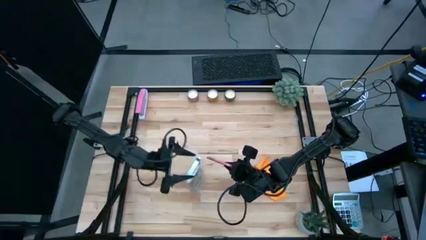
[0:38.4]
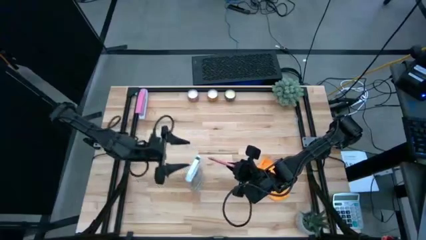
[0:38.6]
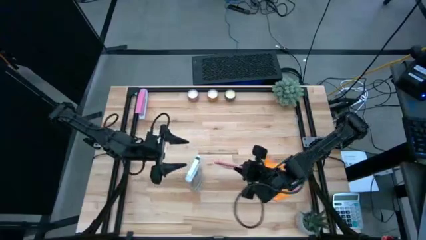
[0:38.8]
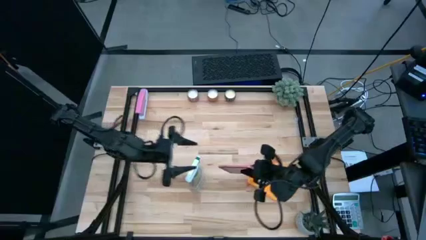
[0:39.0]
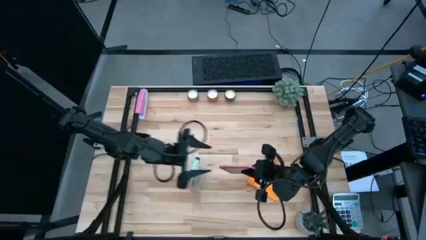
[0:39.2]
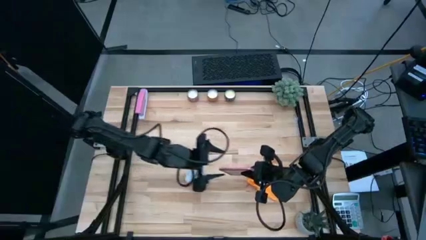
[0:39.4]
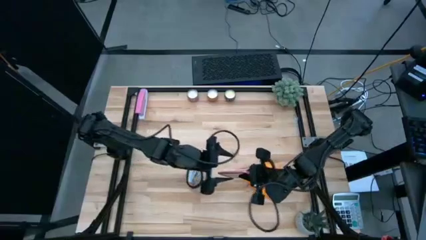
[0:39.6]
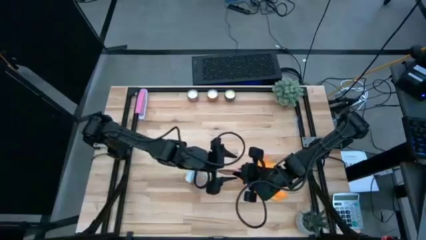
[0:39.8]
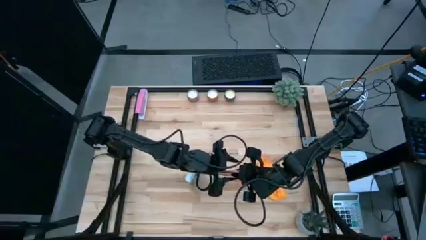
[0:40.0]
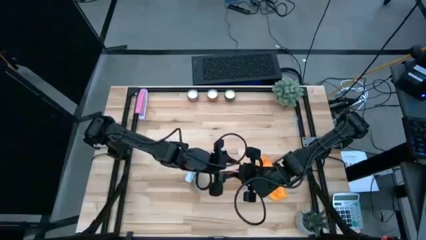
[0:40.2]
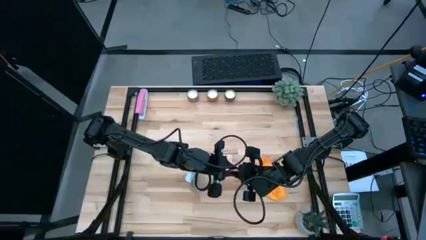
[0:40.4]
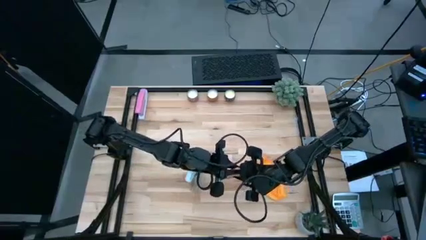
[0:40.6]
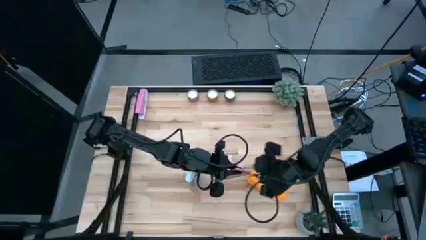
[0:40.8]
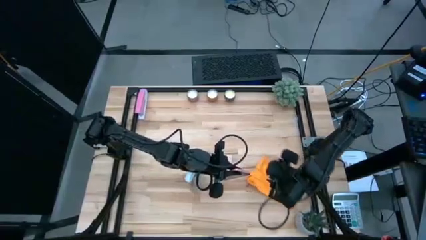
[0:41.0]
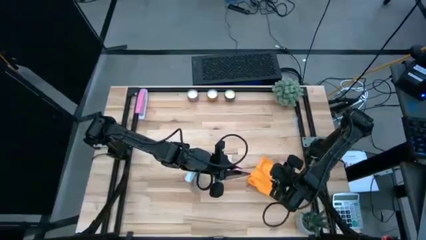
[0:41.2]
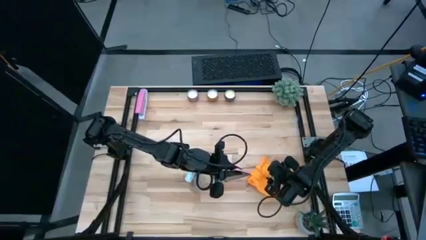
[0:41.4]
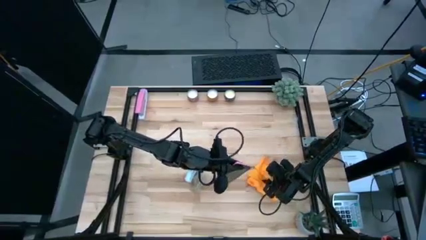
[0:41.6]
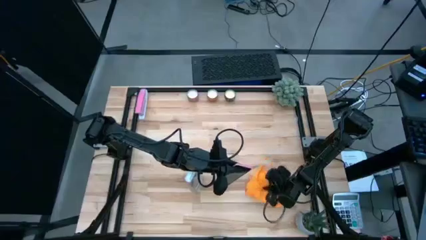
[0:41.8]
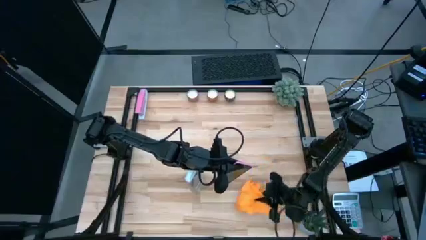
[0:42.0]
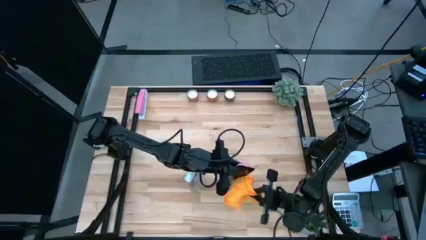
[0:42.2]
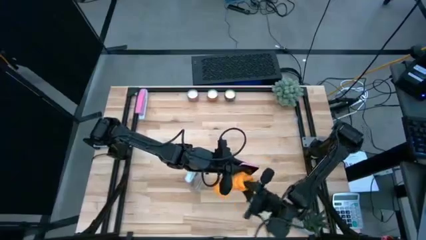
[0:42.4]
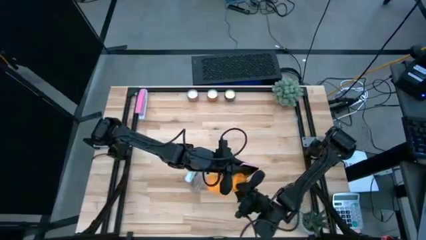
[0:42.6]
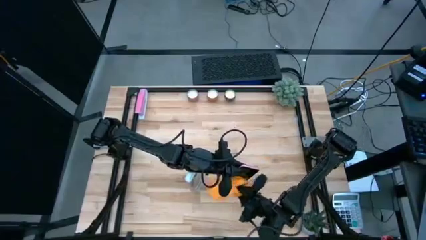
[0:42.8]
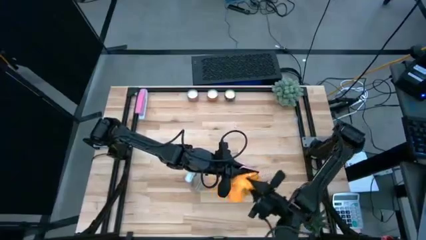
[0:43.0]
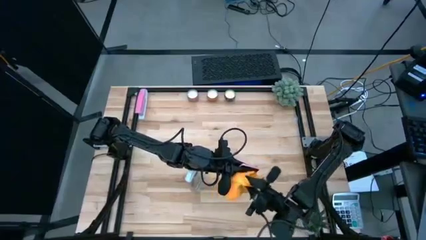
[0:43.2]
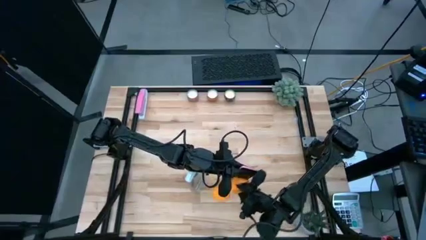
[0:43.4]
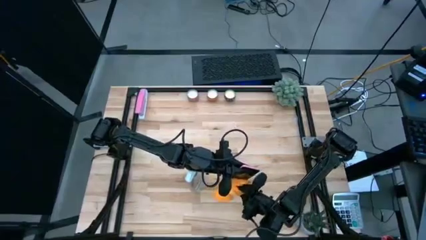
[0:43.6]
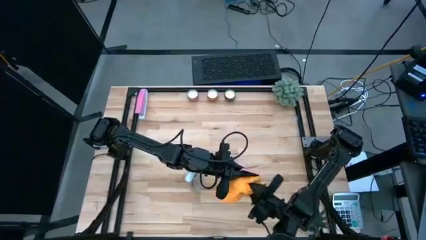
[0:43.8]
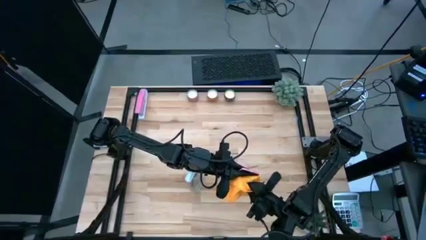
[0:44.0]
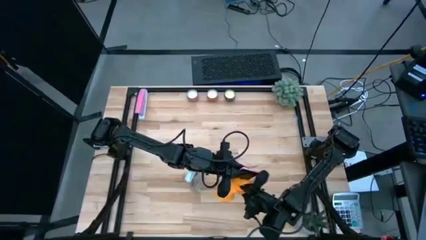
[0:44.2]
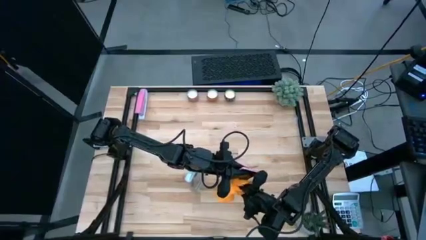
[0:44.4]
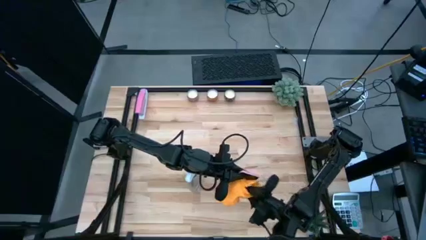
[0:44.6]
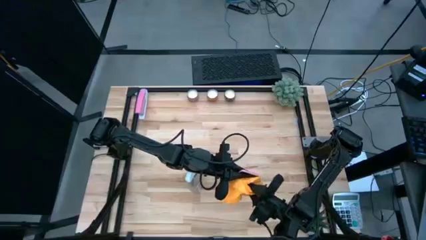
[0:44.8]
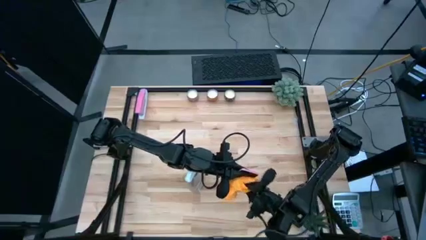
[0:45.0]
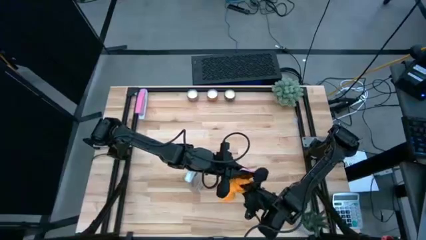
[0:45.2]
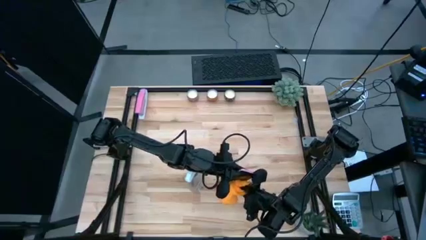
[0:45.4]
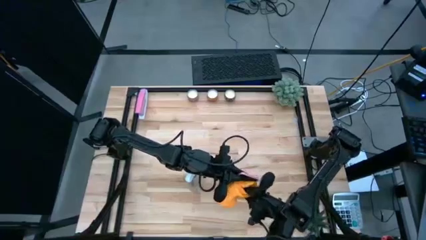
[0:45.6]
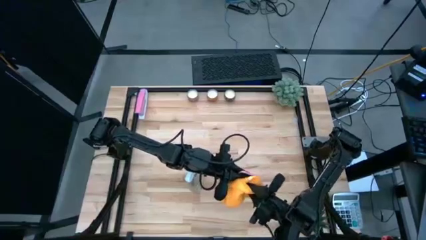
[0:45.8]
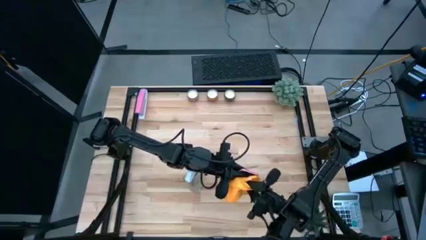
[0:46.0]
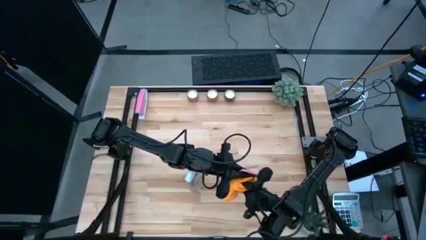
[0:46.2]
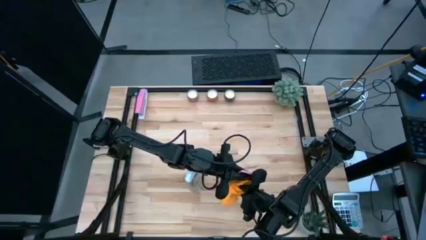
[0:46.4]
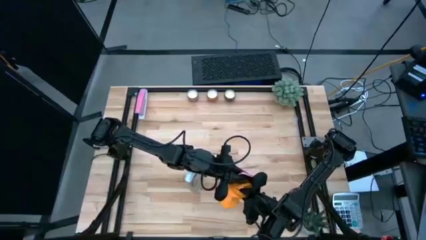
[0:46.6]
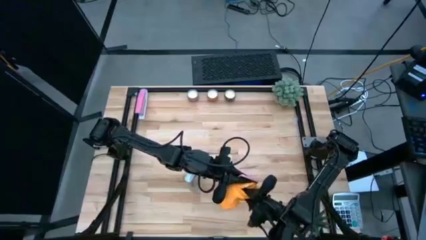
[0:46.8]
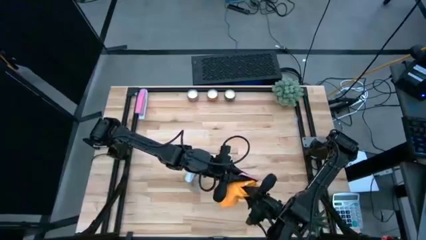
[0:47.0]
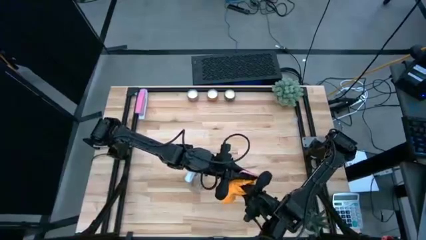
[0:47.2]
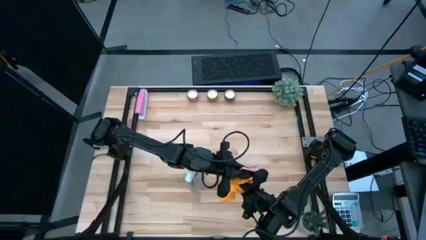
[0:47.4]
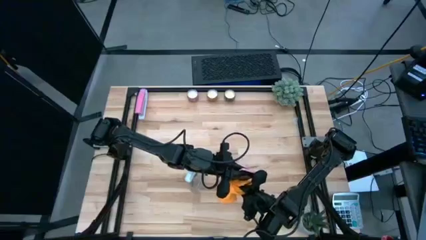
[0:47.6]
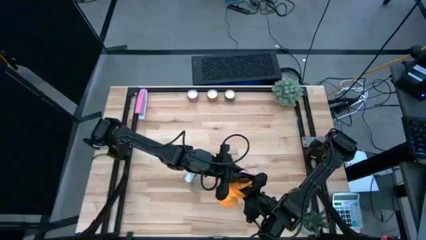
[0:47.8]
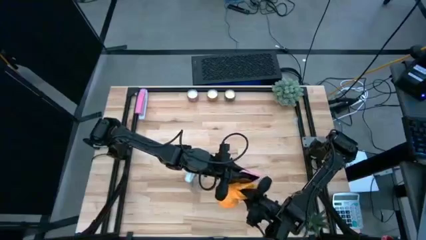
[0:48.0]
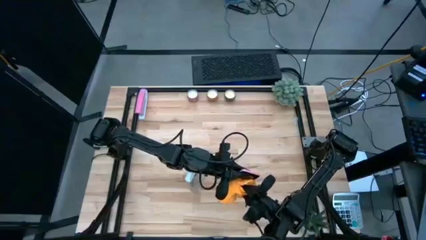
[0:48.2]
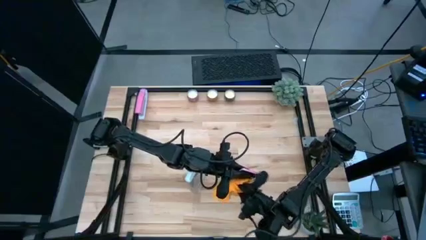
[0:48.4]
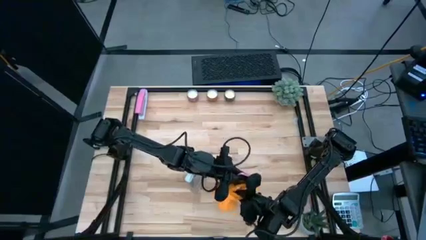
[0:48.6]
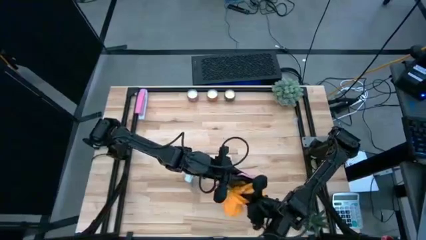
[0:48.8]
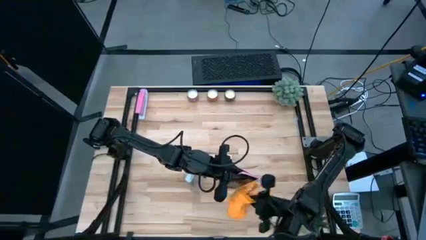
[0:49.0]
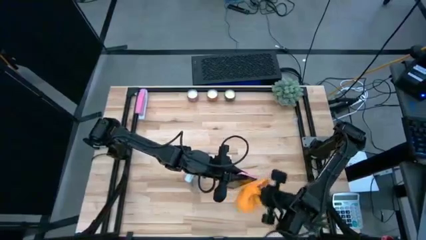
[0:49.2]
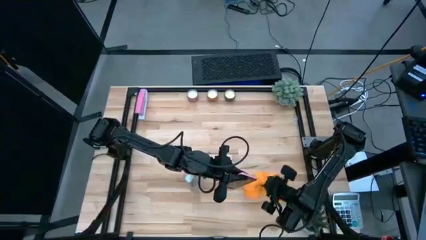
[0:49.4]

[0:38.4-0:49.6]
Task: Apply microfiber cloth
Wipe the front of the cellphone with a microfiber cloth

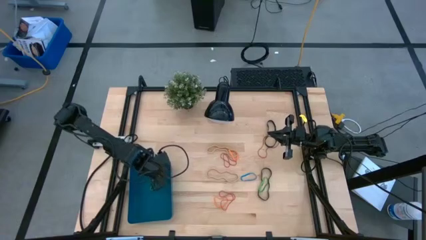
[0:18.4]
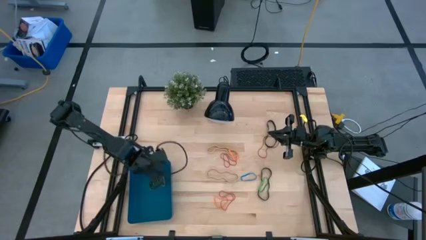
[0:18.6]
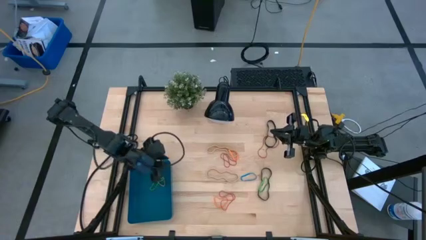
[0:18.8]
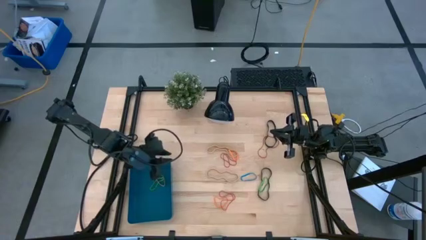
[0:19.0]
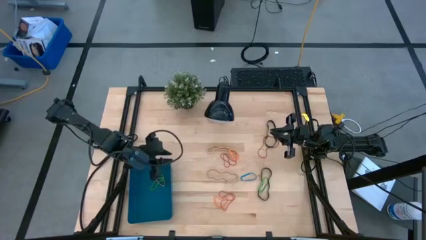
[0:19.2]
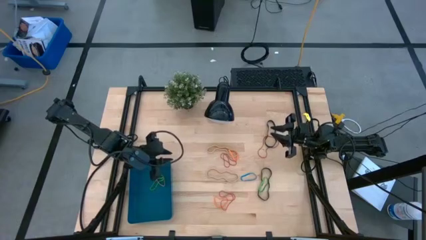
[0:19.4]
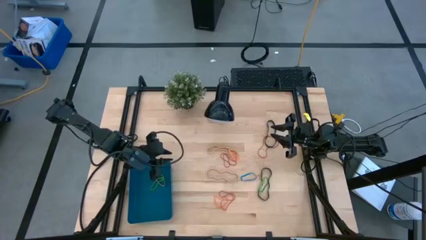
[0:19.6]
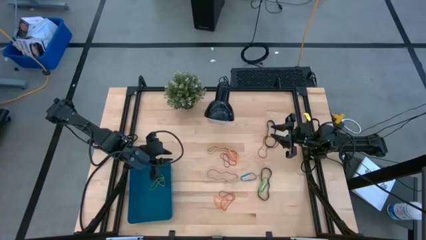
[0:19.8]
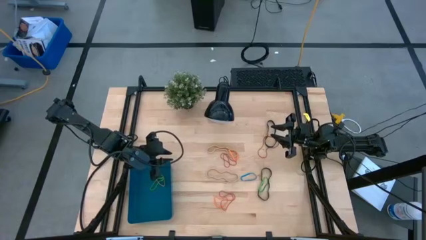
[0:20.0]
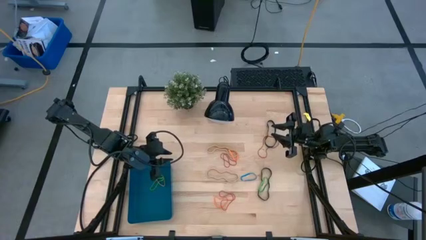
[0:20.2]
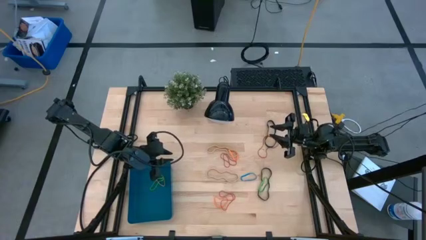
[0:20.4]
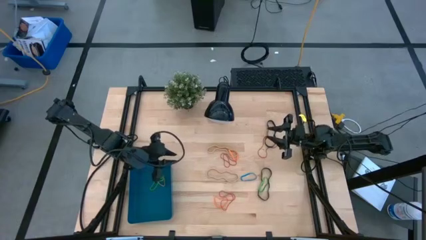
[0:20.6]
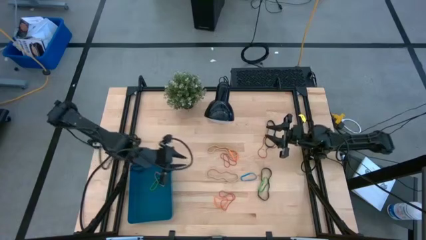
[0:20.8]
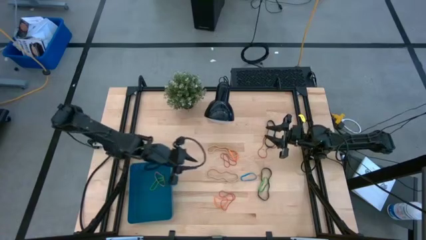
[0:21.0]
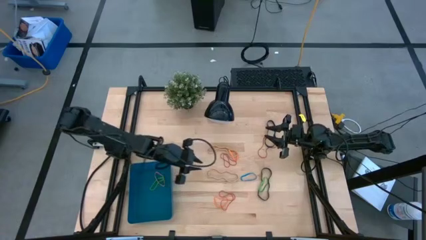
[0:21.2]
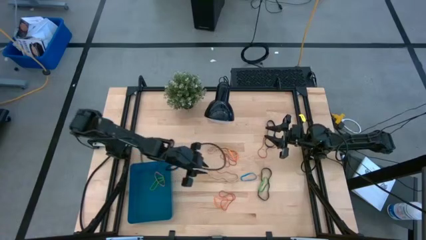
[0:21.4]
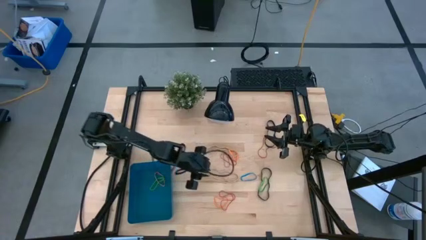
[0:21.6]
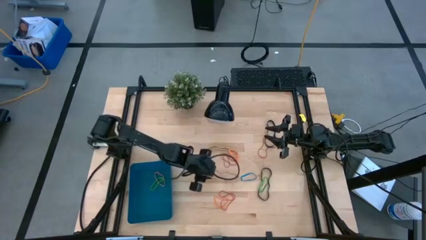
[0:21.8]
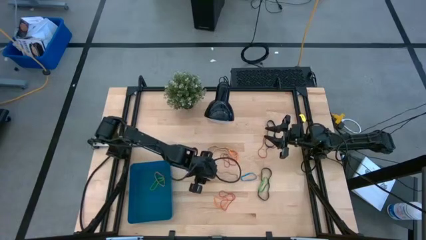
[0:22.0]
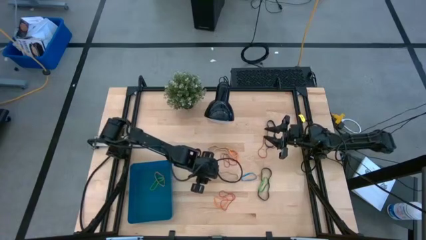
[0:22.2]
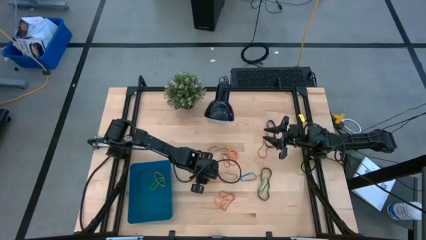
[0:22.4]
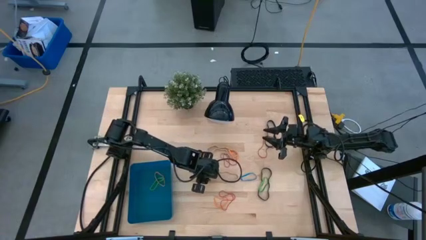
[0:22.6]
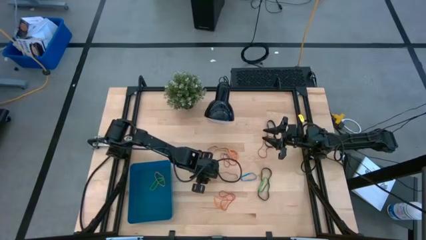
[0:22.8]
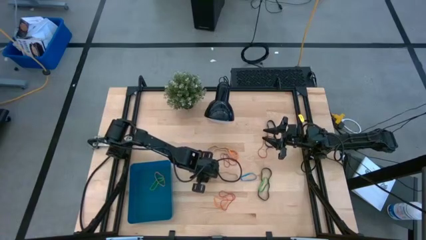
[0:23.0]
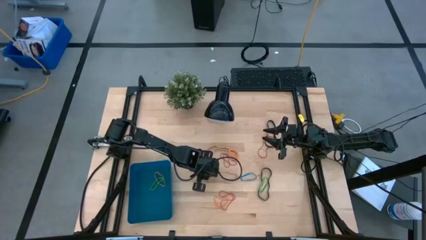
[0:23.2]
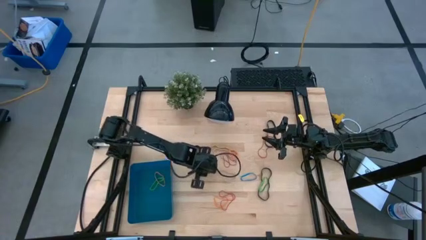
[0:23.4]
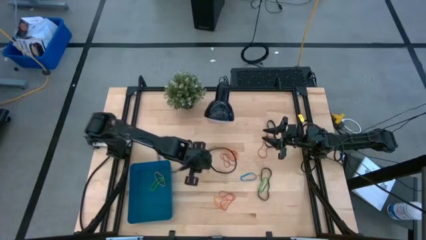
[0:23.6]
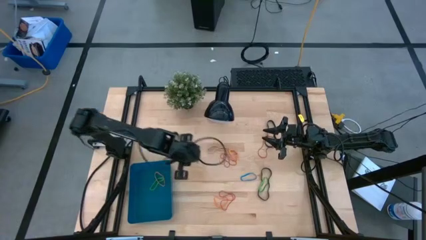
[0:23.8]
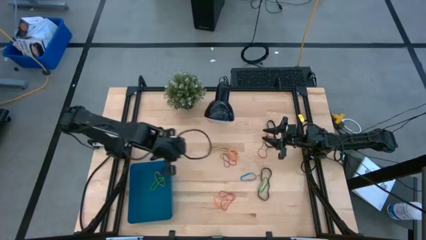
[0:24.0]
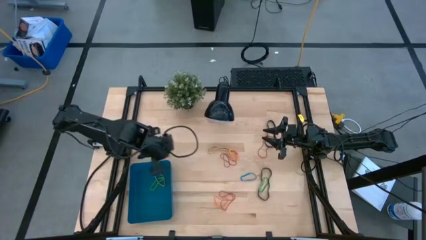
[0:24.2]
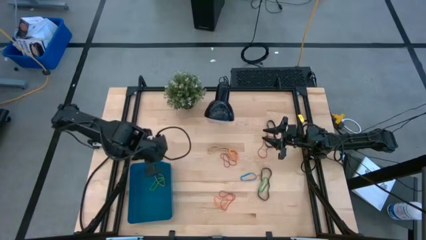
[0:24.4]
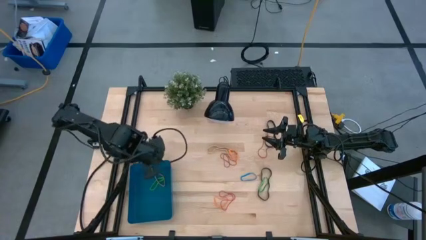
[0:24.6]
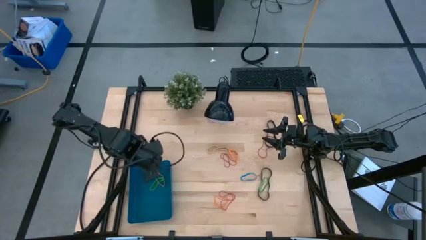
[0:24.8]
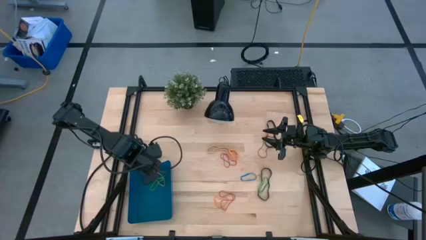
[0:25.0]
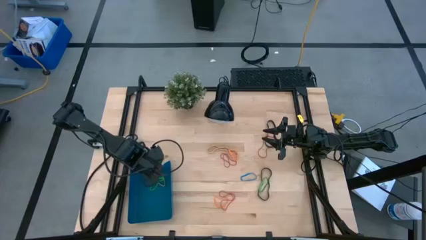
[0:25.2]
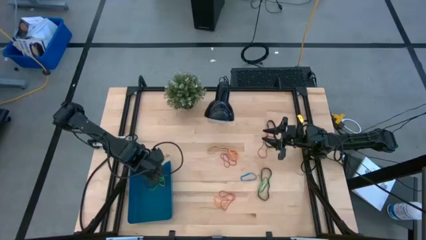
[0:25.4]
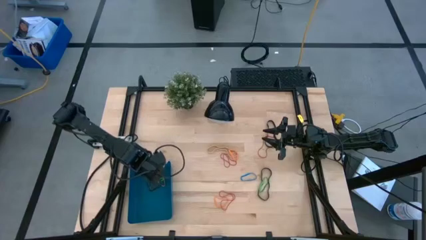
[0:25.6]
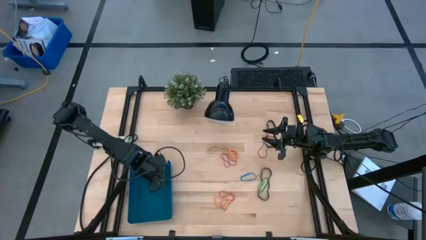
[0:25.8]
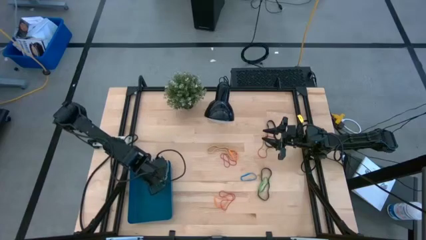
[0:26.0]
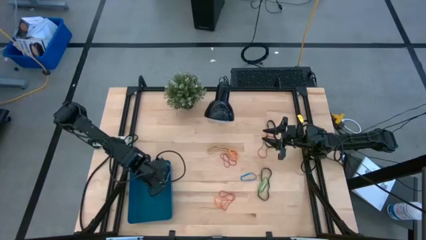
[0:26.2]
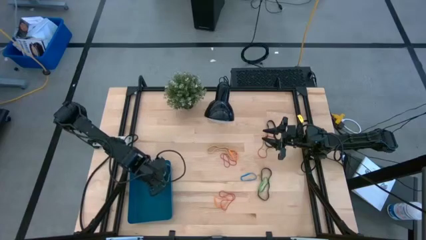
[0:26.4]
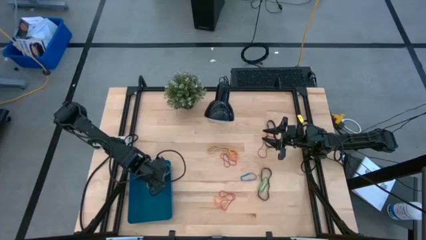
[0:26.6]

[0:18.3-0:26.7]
Task: Pick and place rubber bands into bin
Put the bottom white rubber band into the blue bin
